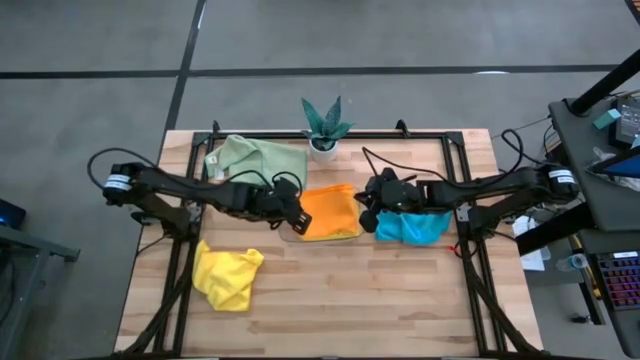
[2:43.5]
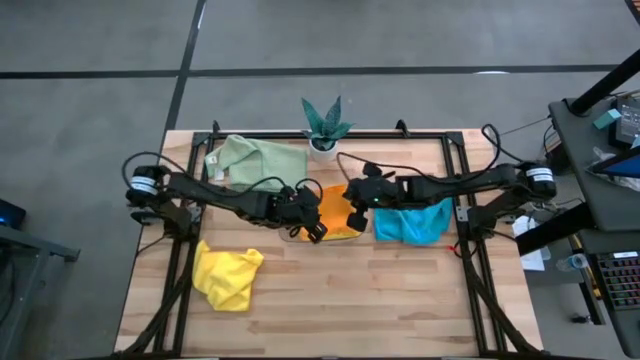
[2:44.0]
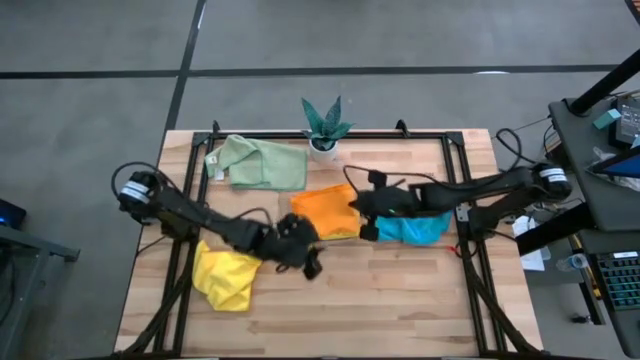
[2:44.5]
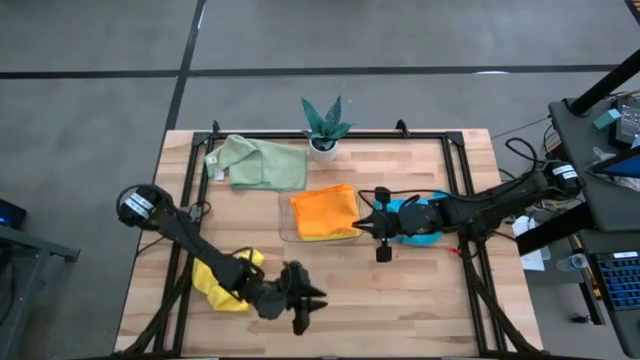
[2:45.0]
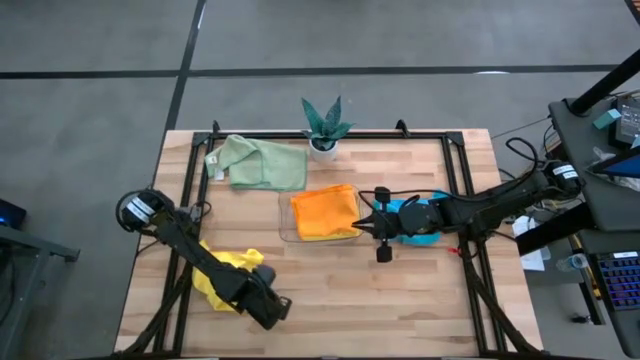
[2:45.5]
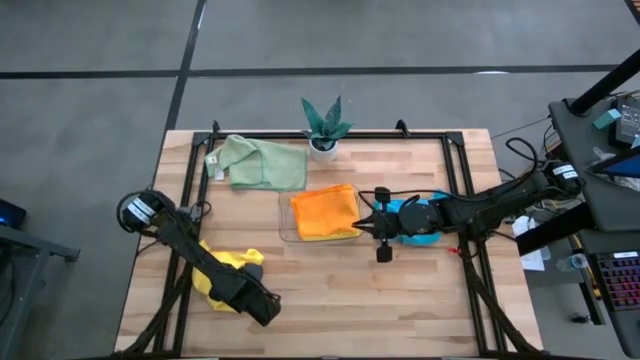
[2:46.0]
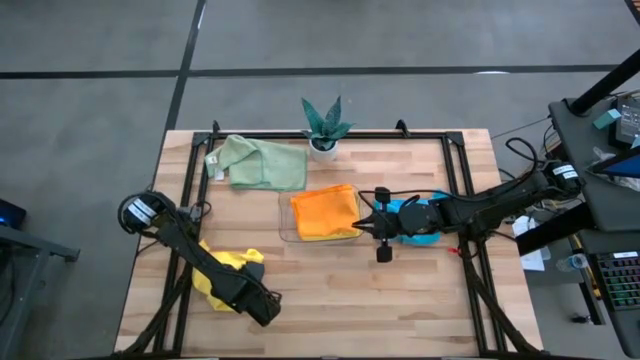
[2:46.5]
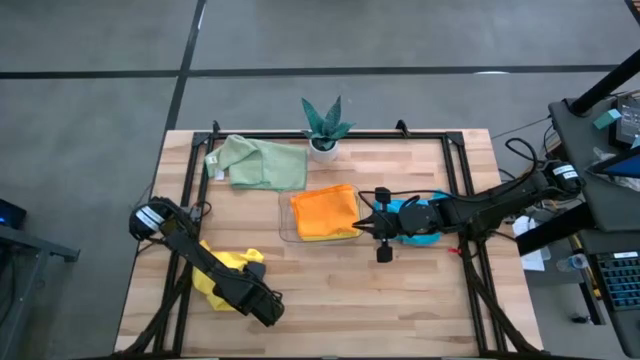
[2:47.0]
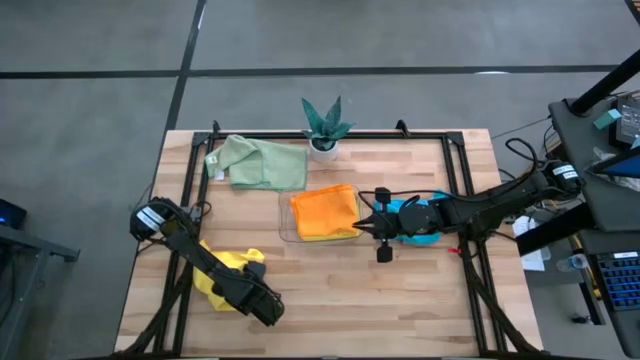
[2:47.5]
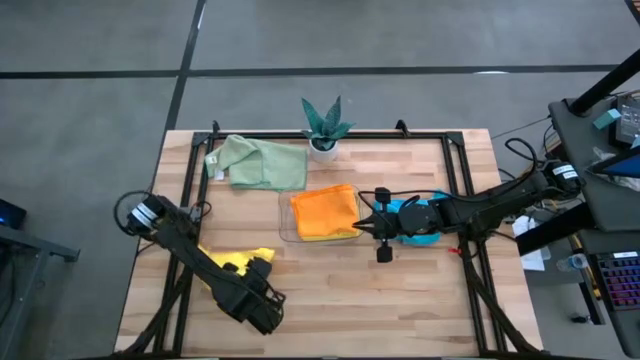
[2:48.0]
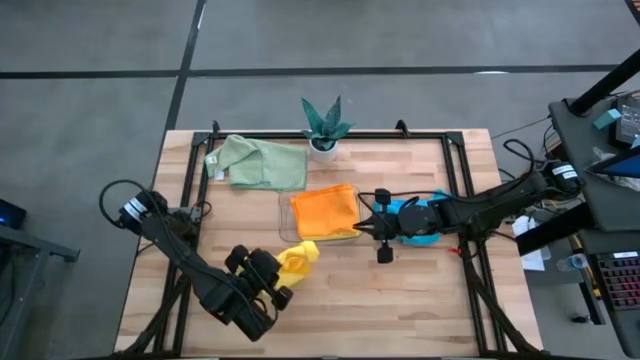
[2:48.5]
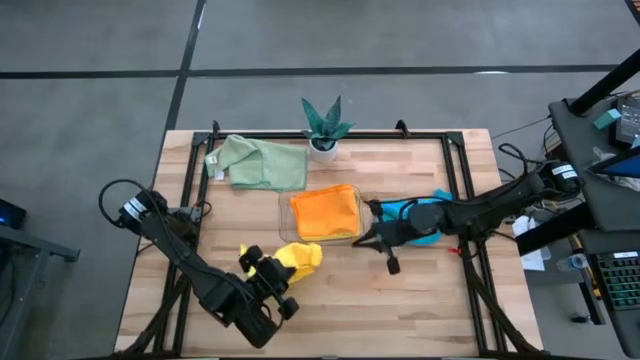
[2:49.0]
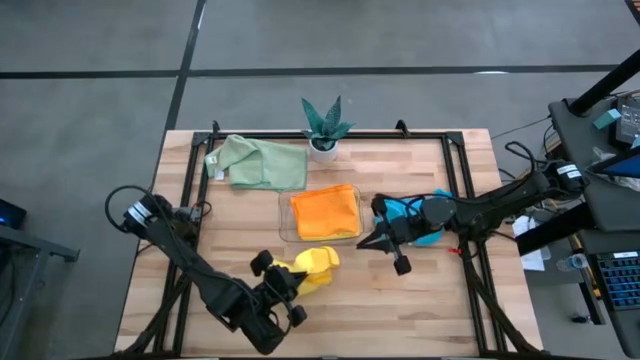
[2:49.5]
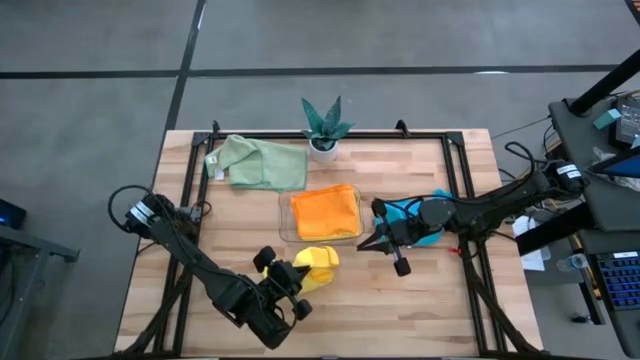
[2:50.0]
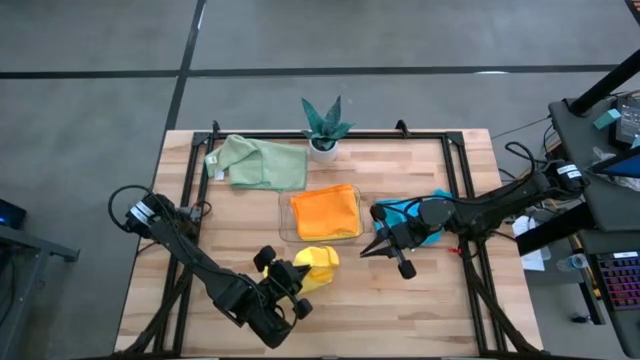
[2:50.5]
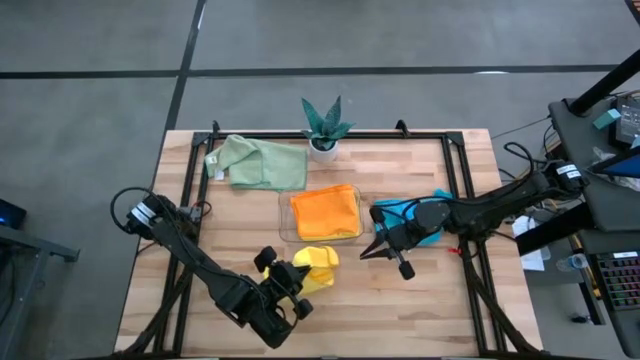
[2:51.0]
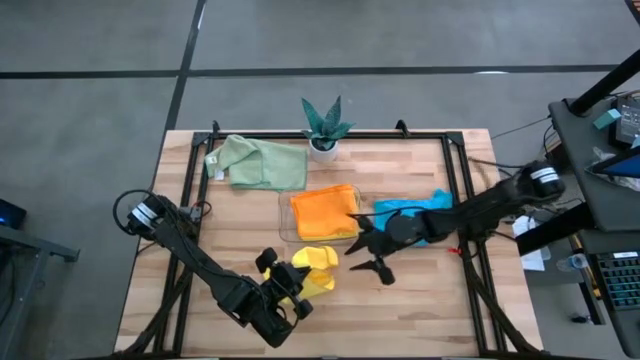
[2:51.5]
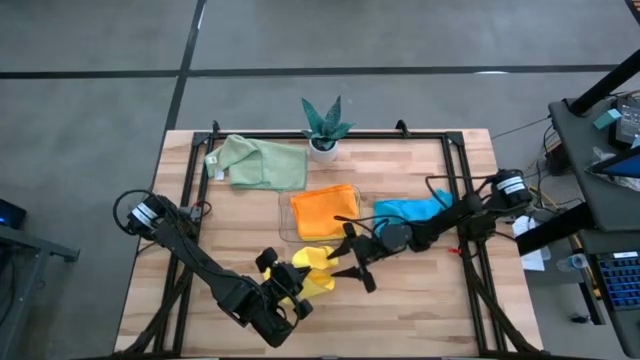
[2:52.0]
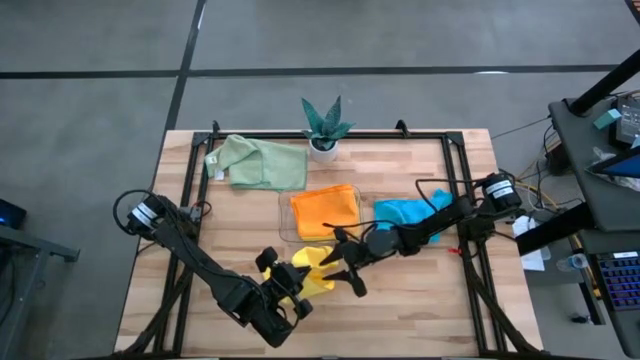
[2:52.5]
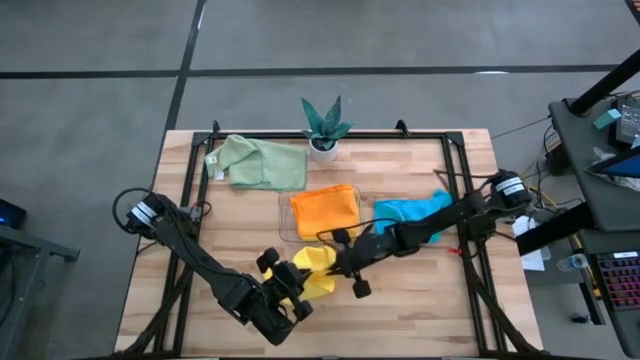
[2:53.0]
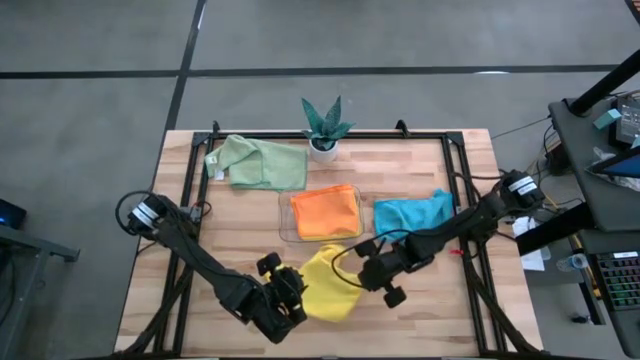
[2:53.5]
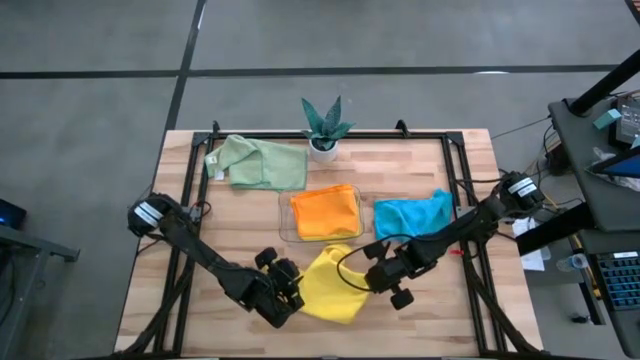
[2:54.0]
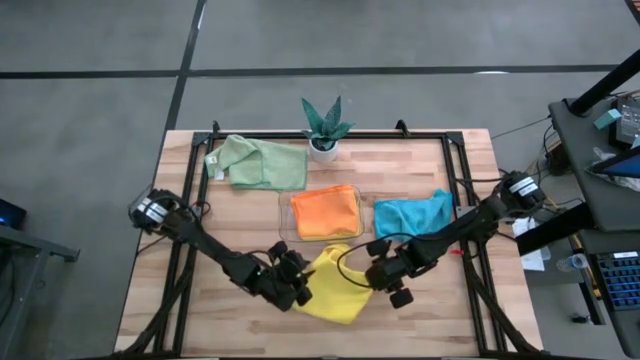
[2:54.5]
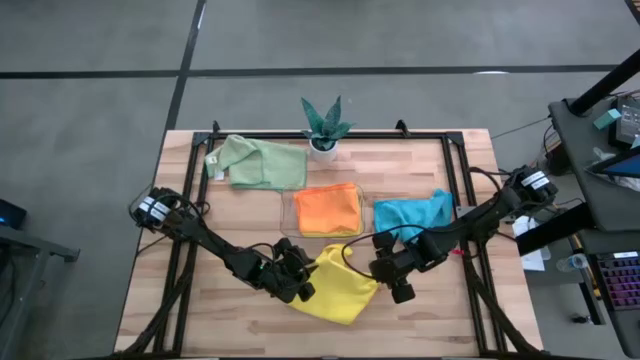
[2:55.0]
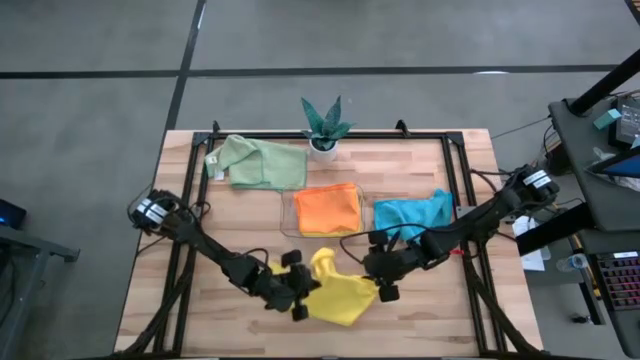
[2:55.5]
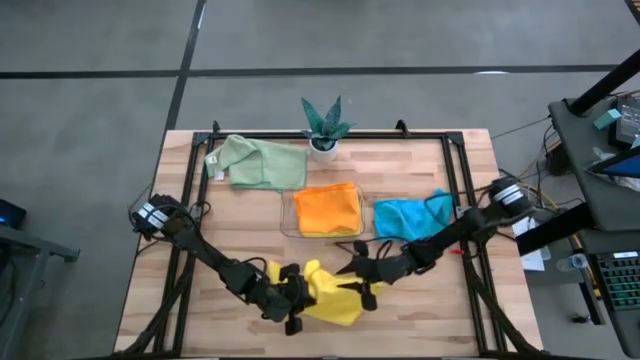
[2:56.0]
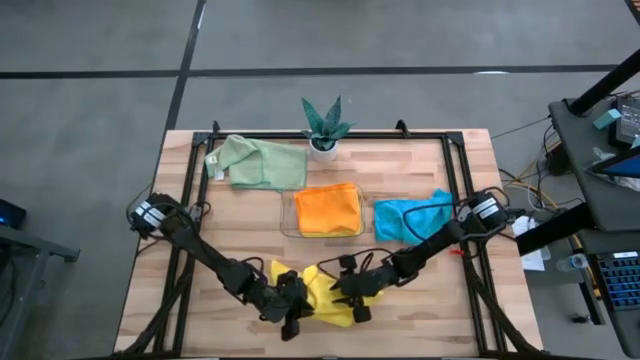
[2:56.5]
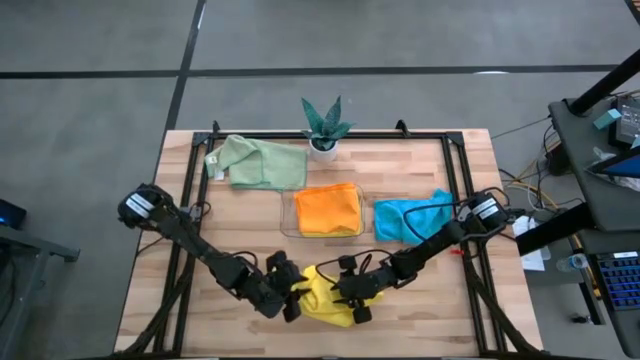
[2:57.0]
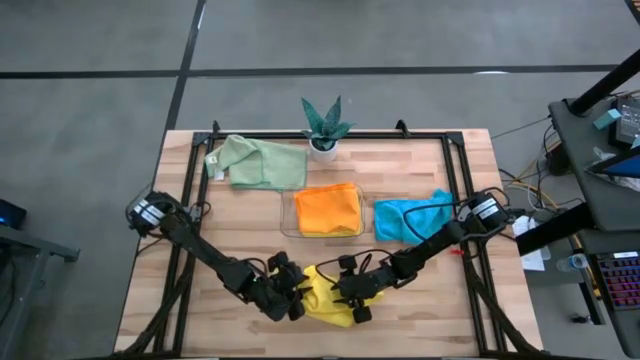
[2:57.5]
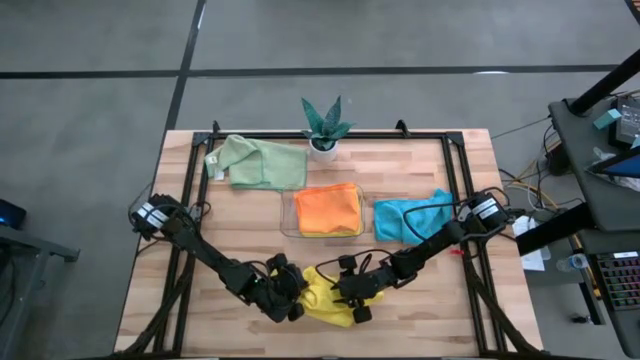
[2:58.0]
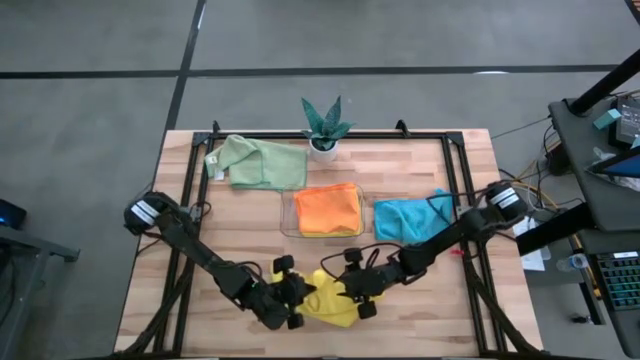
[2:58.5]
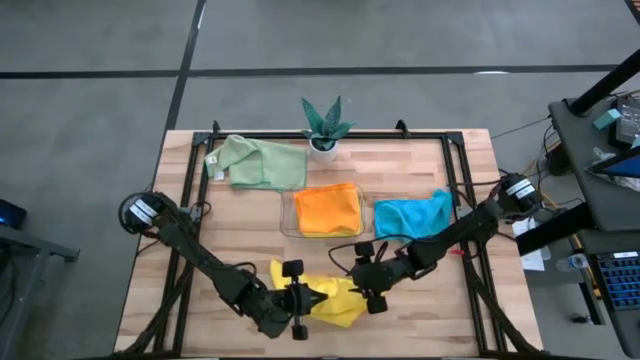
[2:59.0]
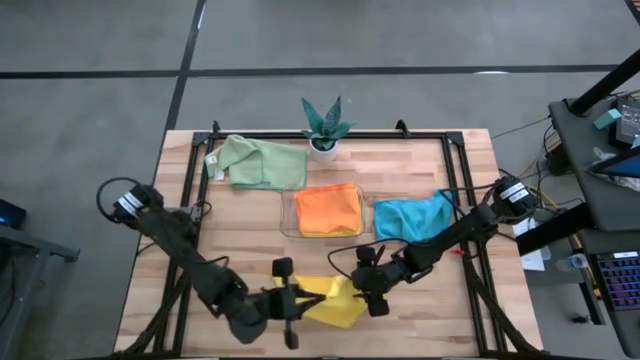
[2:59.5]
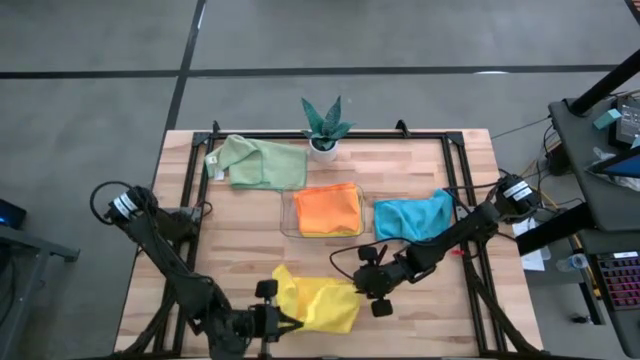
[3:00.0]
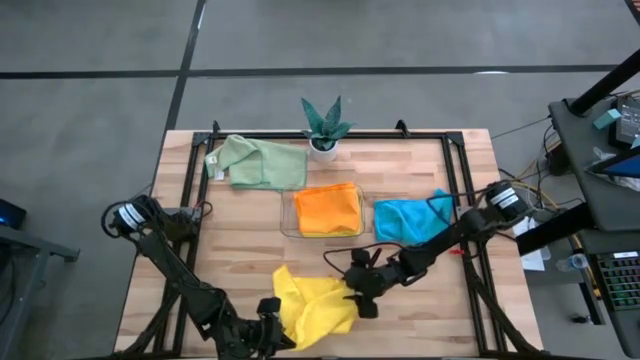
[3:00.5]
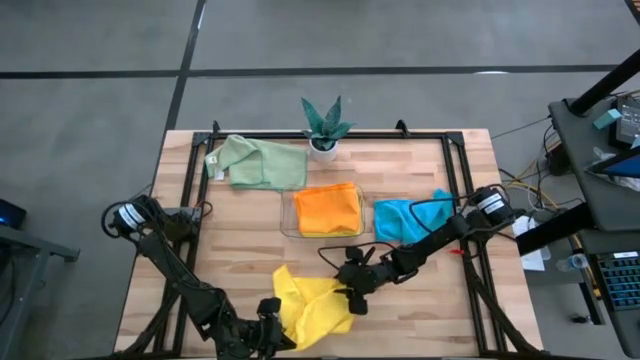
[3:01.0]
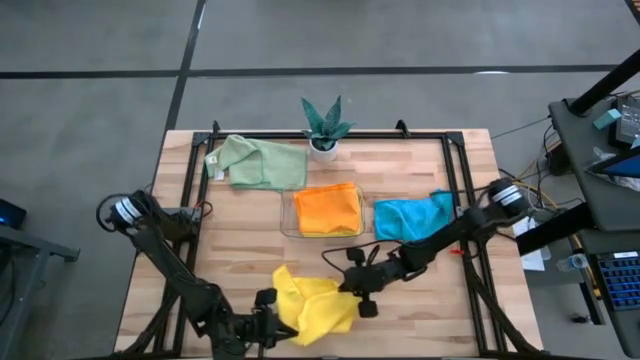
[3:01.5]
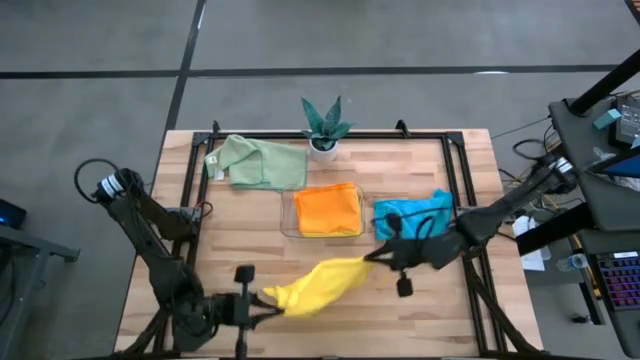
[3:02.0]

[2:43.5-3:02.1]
Task: Fold microfiber towels
Fold the yellow microfiber towel
